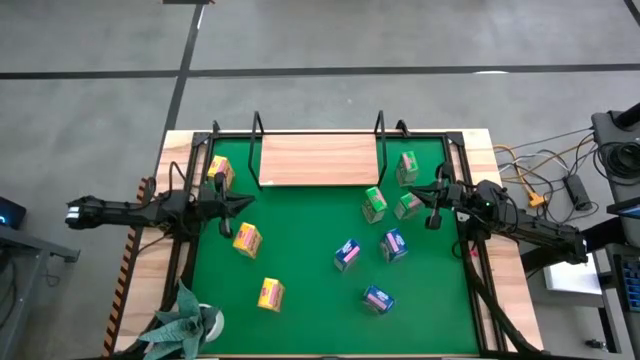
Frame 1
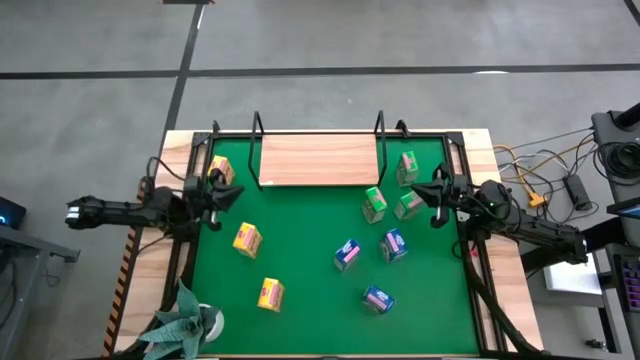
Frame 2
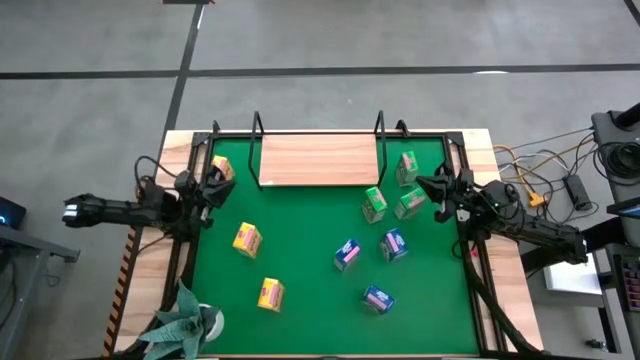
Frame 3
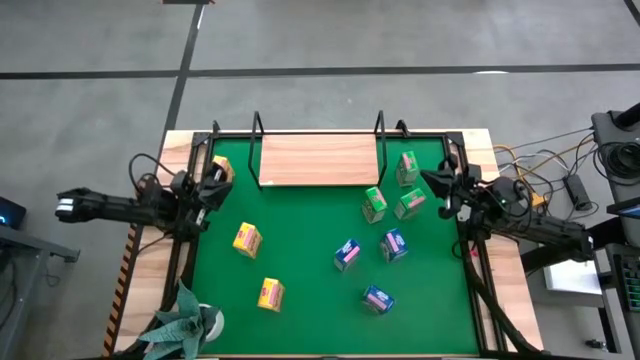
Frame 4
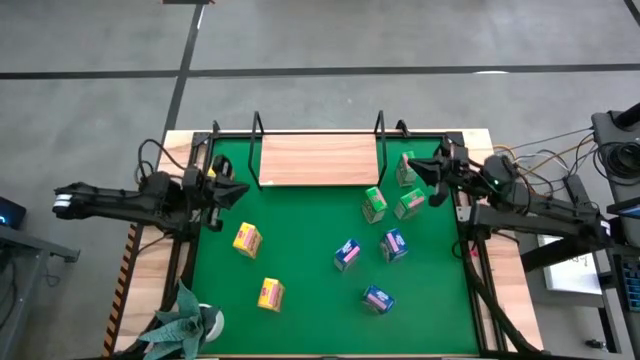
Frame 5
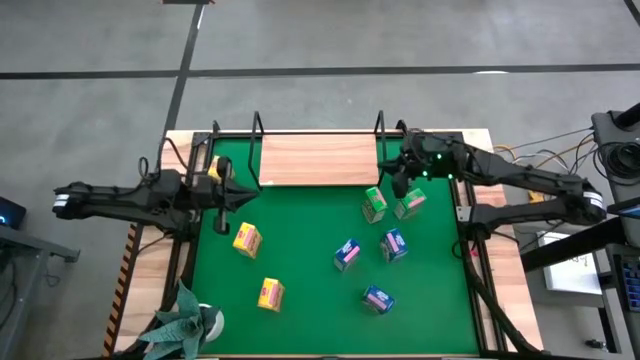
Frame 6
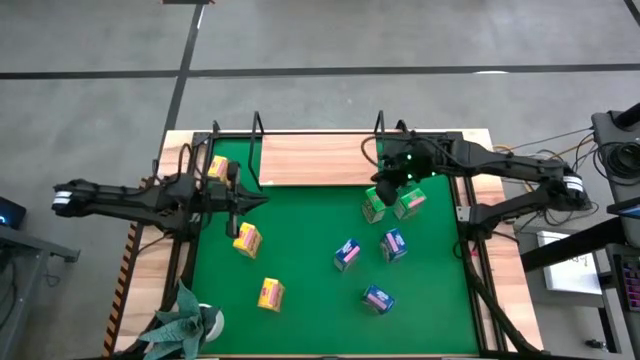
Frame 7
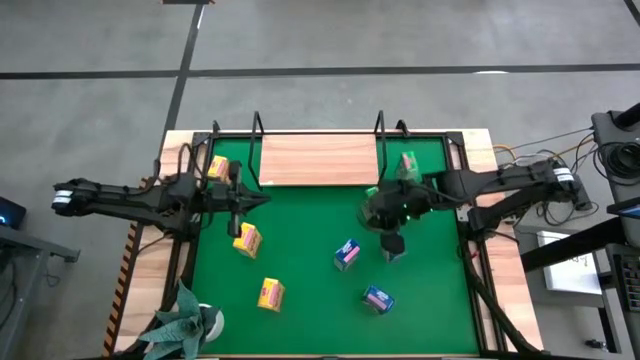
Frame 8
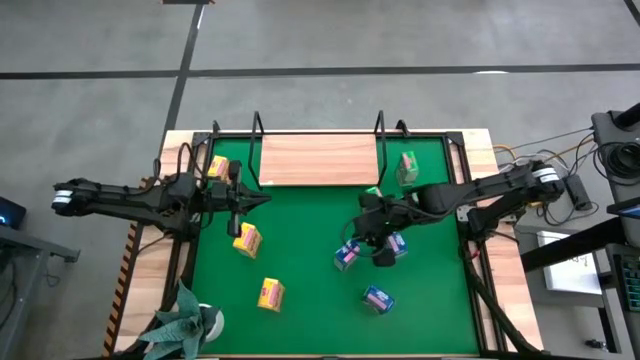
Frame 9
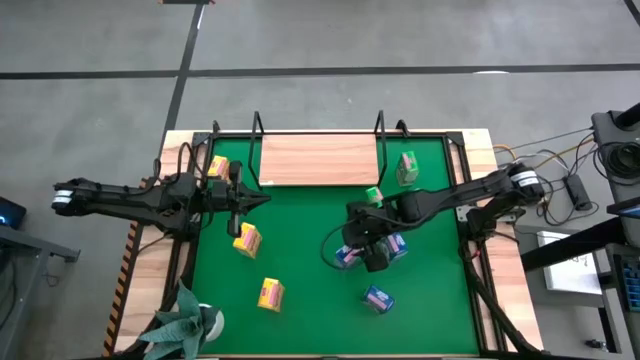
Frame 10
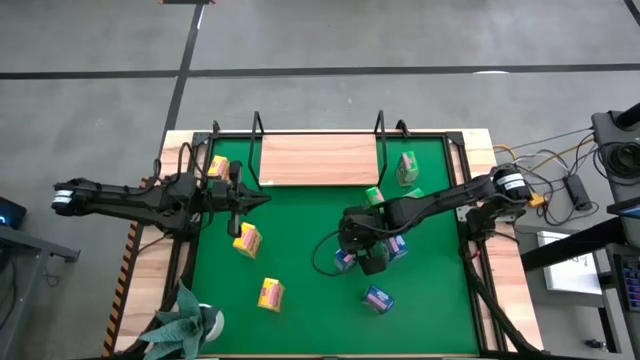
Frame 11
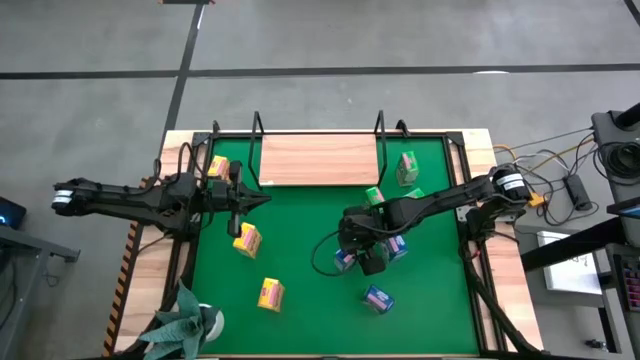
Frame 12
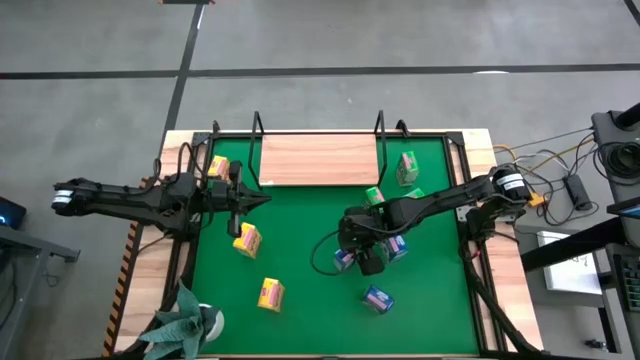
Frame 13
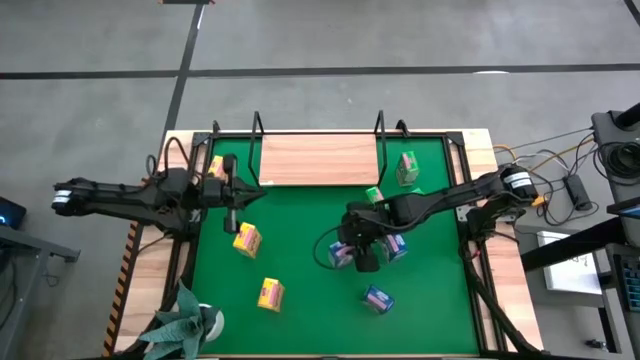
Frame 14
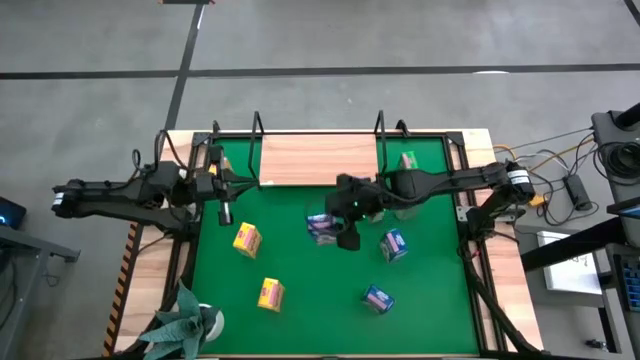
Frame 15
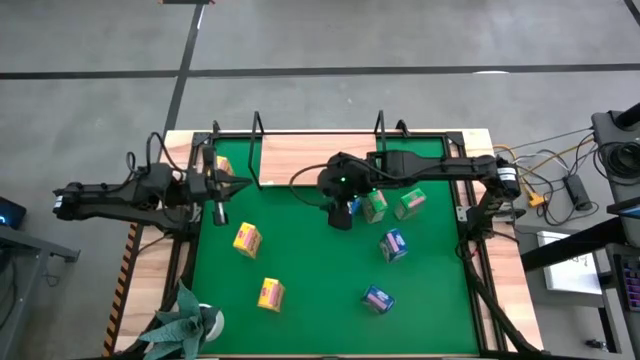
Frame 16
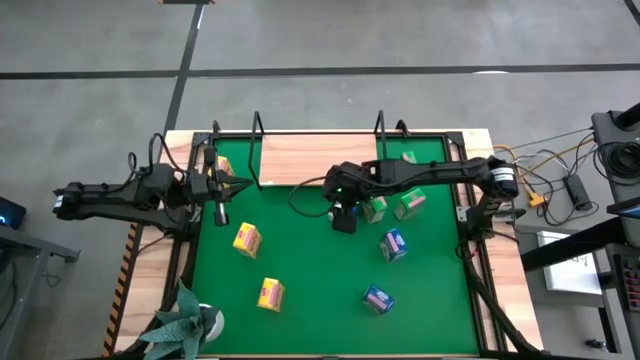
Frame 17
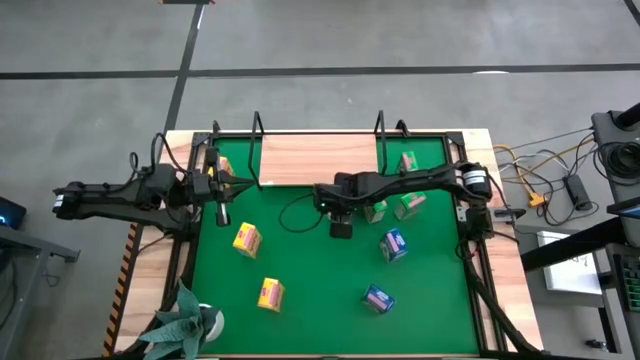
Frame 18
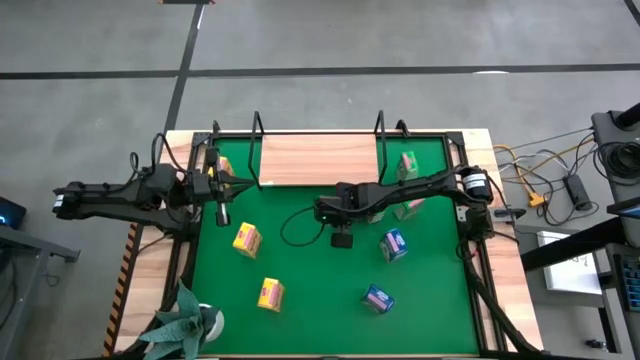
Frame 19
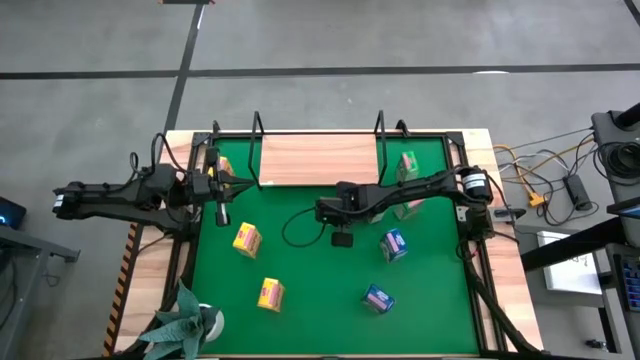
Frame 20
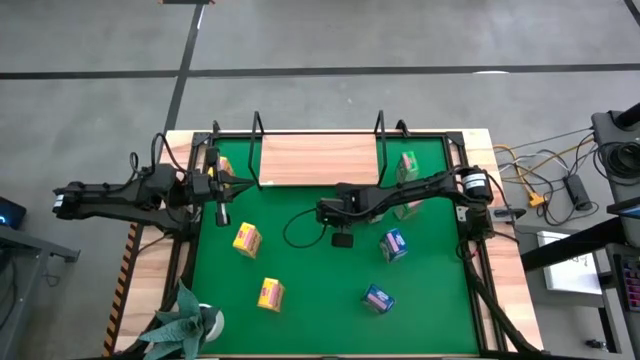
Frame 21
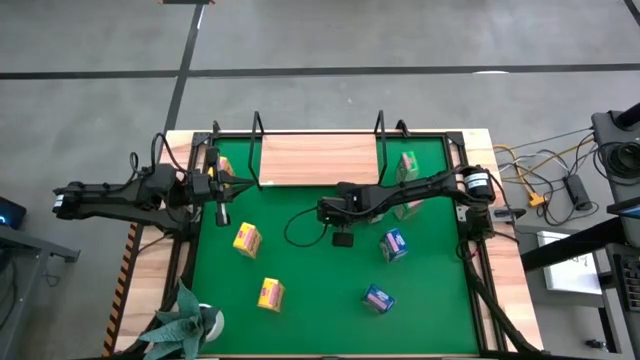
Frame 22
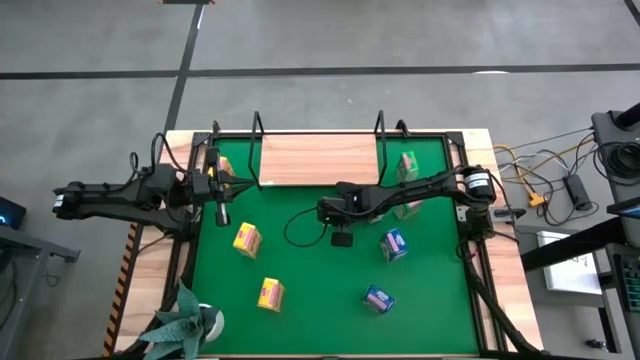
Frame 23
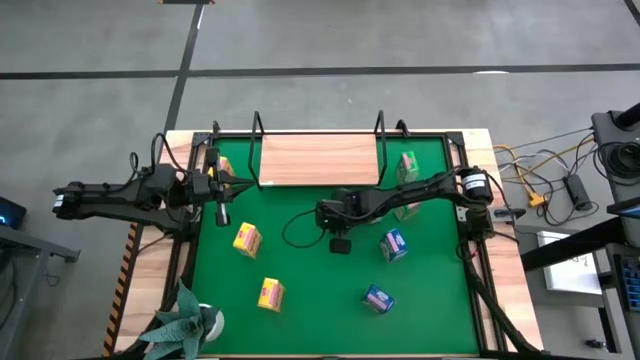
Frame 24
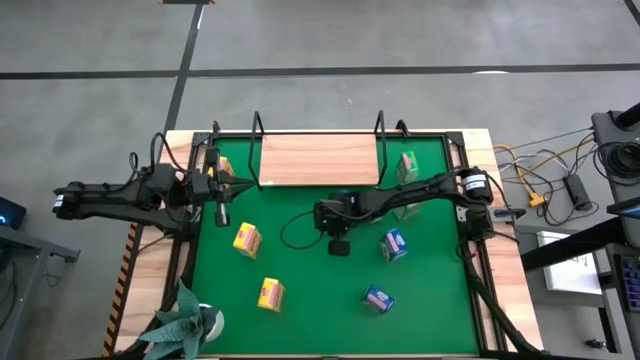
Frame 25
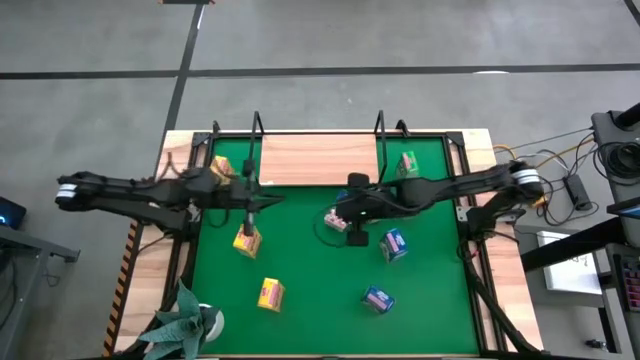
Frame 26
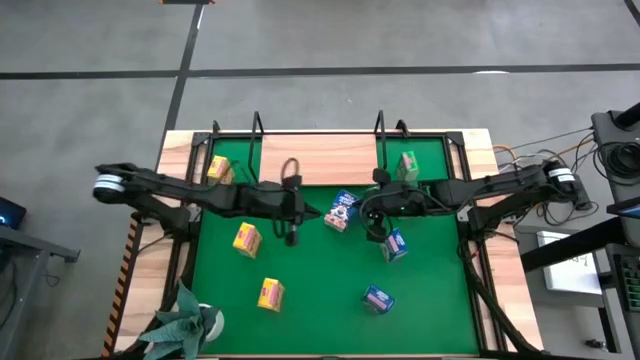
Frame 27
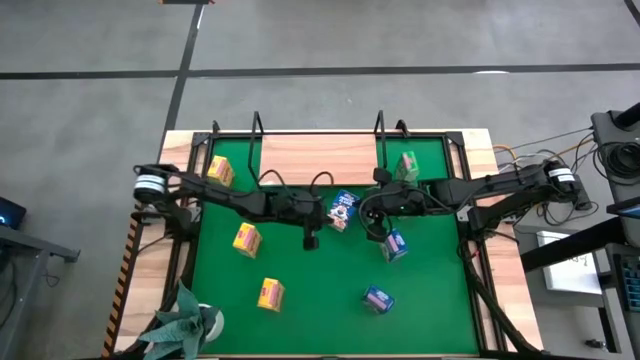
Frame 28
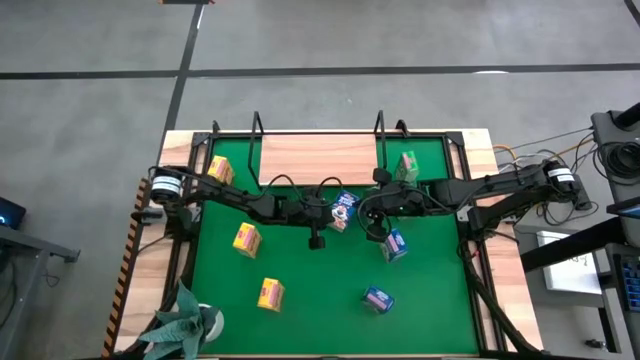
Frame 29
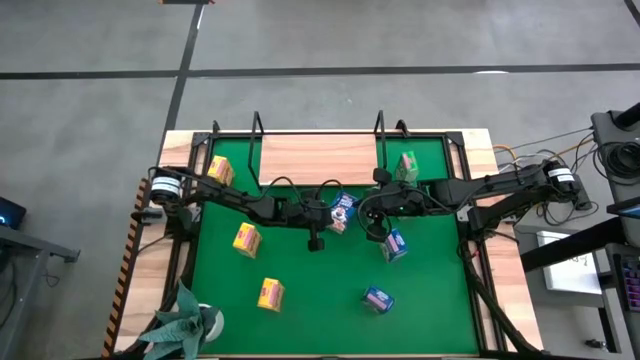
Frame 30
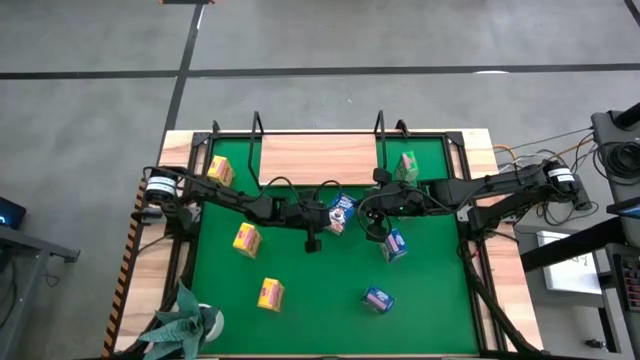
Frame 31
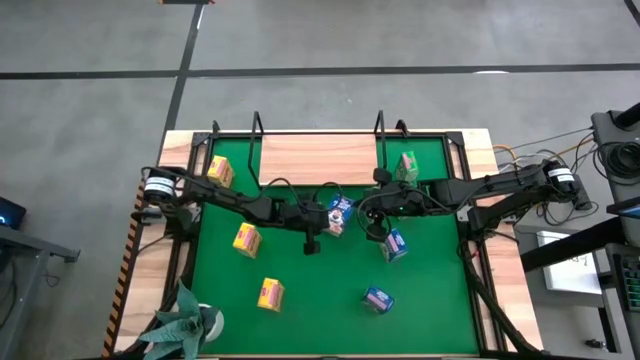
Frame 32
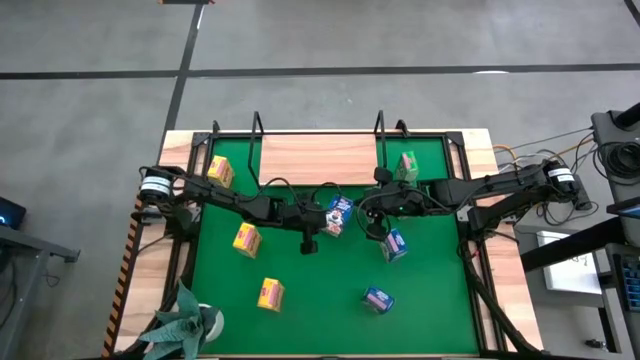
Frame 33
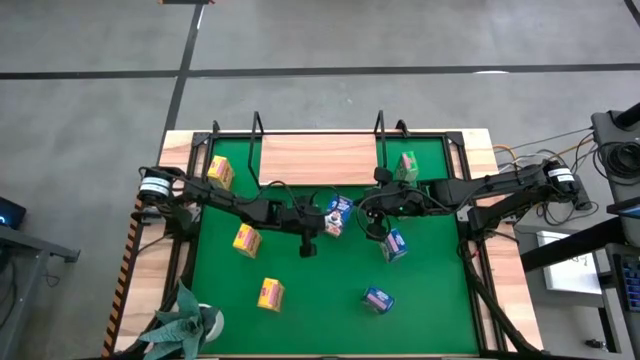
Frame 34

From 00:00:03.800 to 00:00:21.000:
Task: Stack cereal on shelf
Put the middle blue cereal box on the shelf
